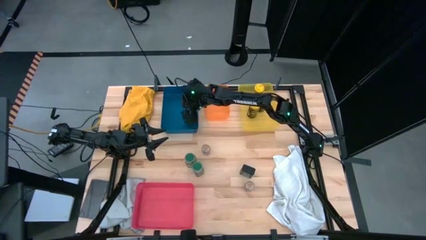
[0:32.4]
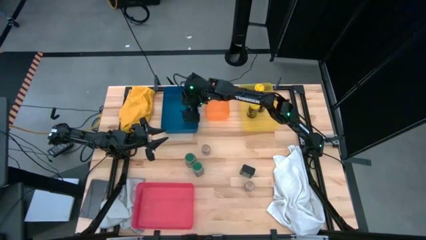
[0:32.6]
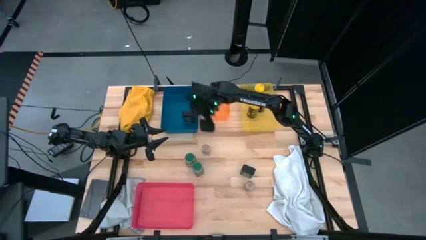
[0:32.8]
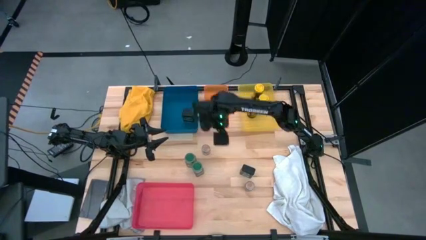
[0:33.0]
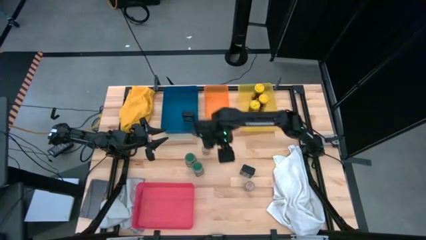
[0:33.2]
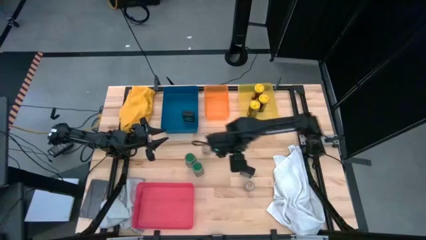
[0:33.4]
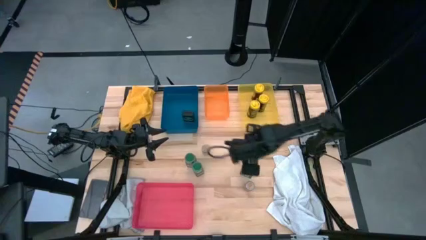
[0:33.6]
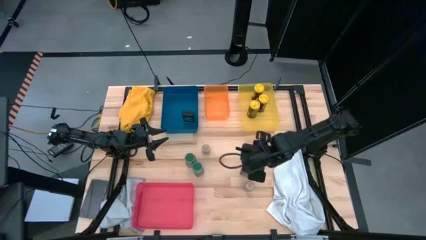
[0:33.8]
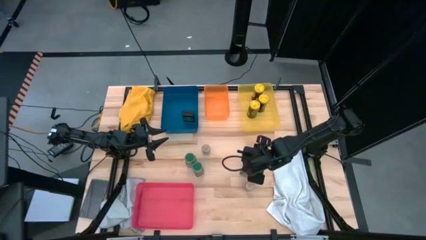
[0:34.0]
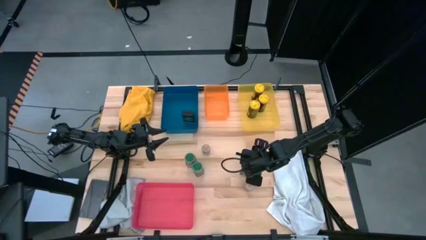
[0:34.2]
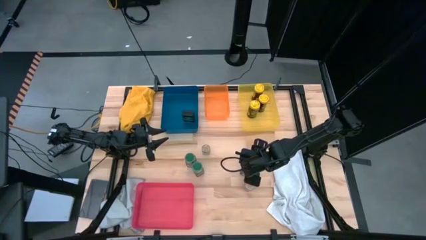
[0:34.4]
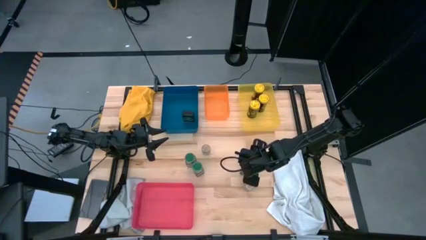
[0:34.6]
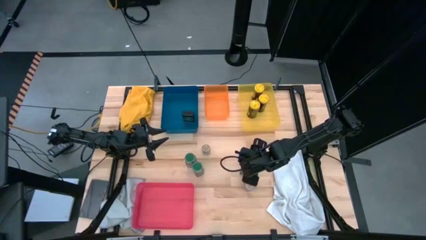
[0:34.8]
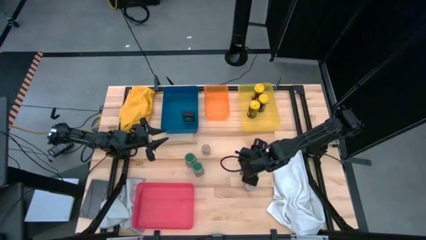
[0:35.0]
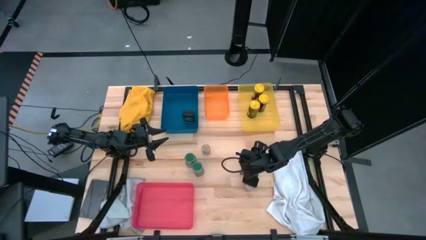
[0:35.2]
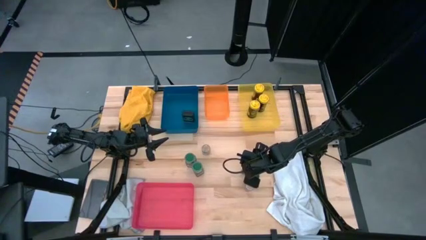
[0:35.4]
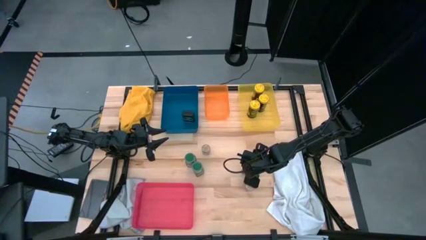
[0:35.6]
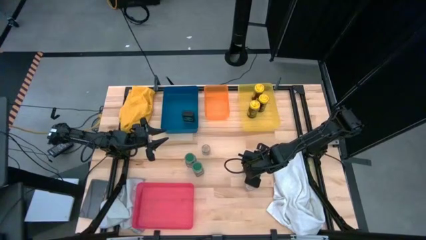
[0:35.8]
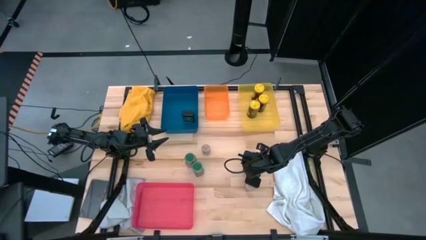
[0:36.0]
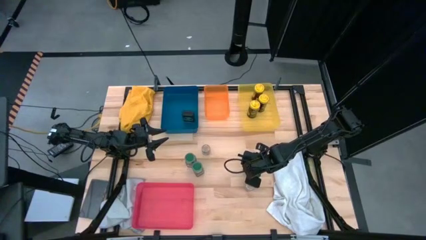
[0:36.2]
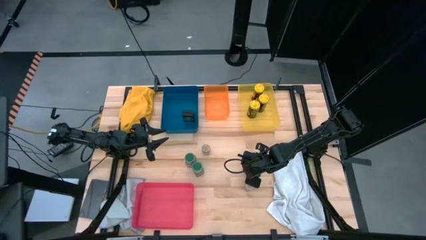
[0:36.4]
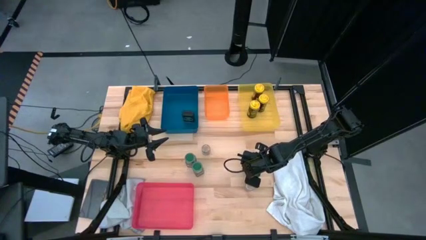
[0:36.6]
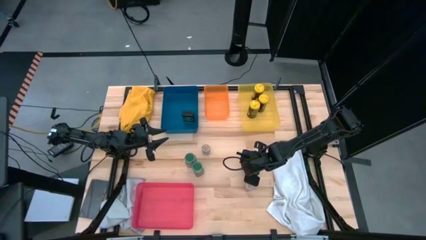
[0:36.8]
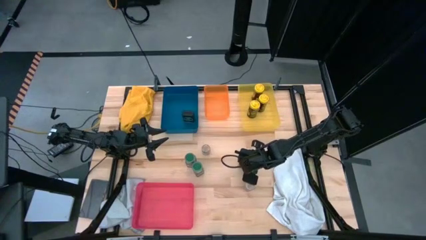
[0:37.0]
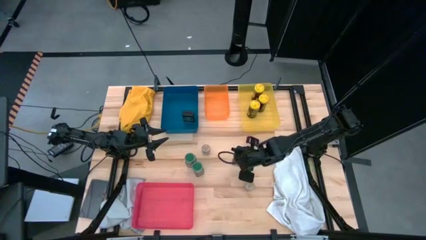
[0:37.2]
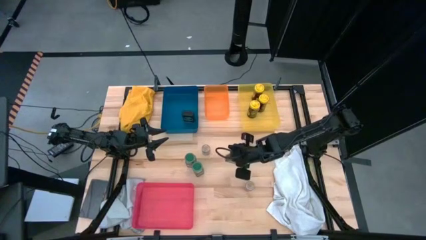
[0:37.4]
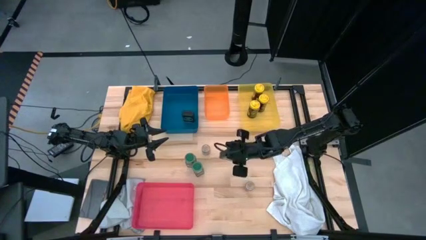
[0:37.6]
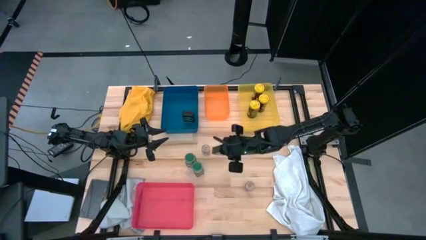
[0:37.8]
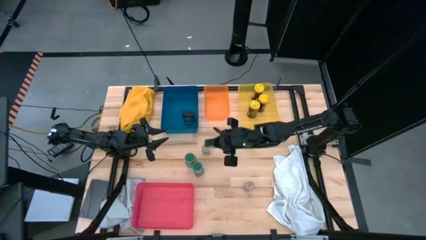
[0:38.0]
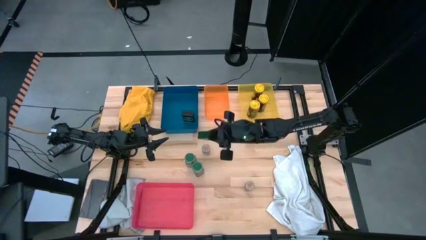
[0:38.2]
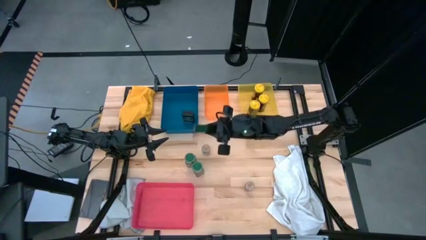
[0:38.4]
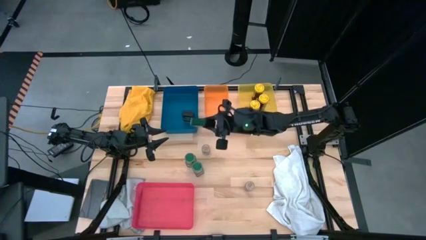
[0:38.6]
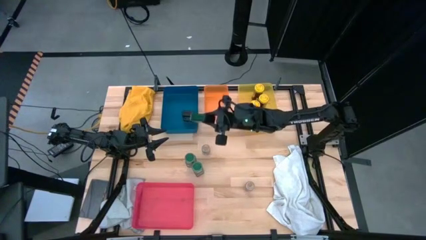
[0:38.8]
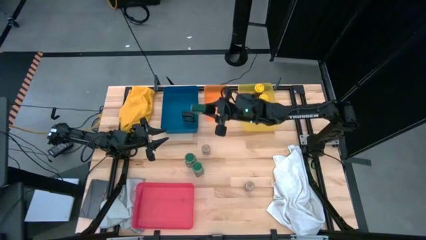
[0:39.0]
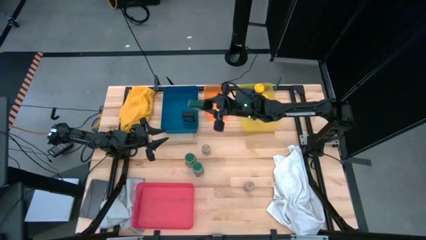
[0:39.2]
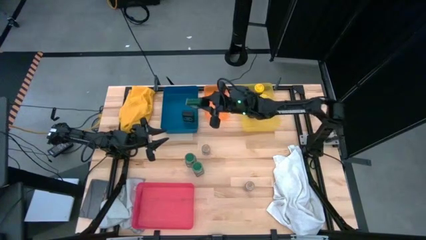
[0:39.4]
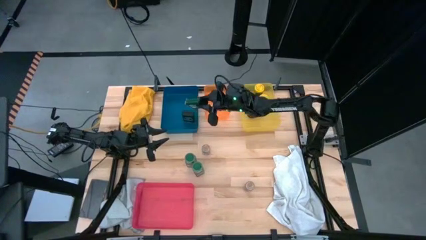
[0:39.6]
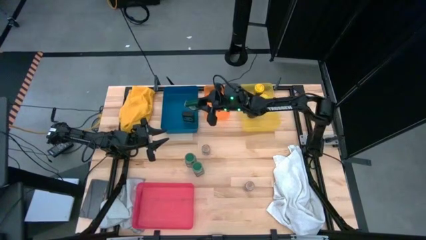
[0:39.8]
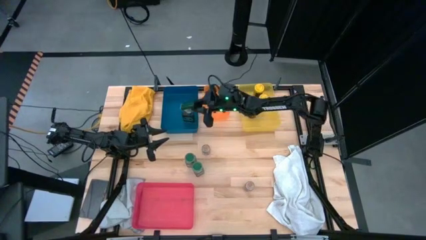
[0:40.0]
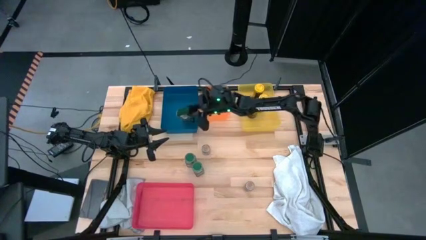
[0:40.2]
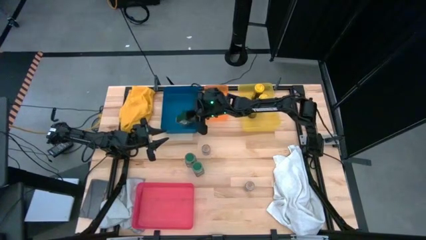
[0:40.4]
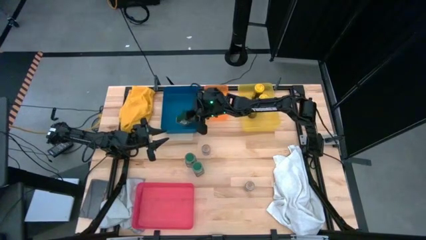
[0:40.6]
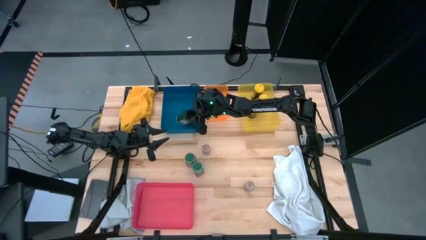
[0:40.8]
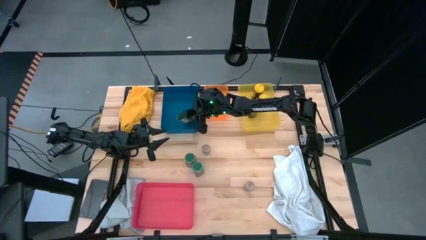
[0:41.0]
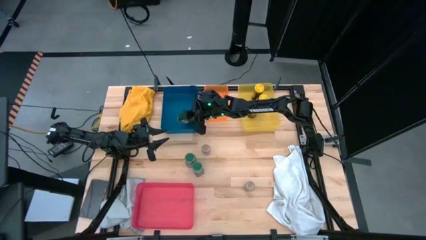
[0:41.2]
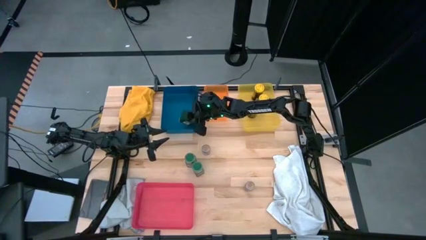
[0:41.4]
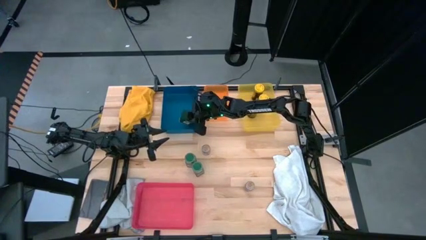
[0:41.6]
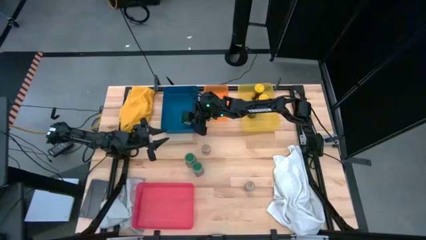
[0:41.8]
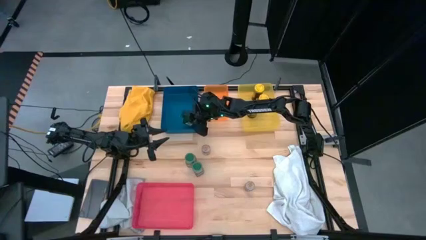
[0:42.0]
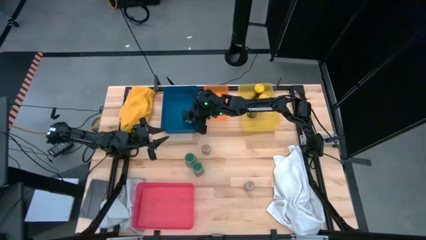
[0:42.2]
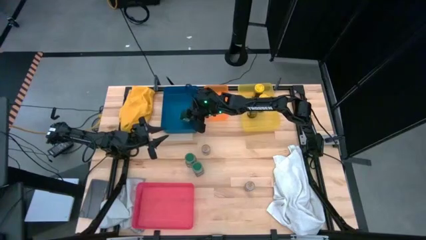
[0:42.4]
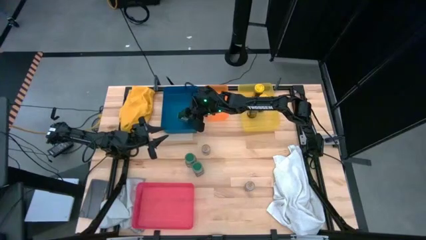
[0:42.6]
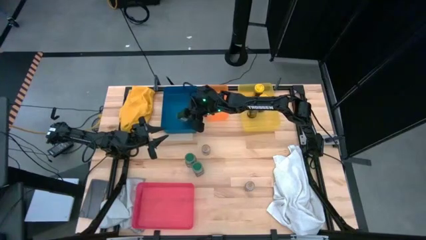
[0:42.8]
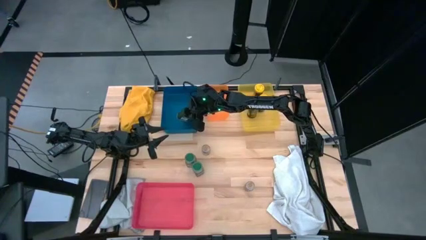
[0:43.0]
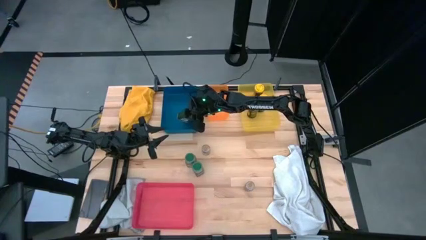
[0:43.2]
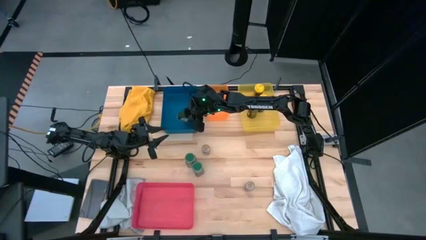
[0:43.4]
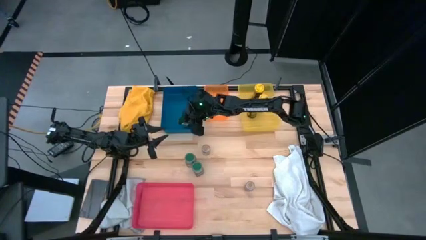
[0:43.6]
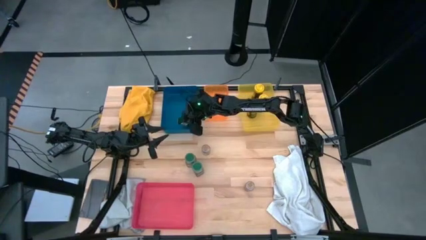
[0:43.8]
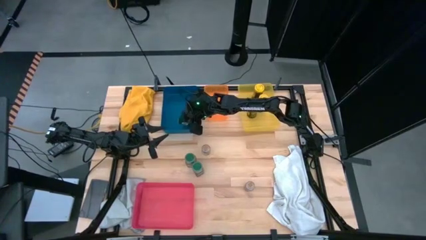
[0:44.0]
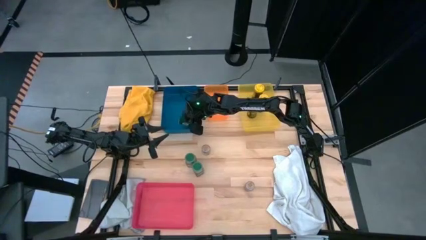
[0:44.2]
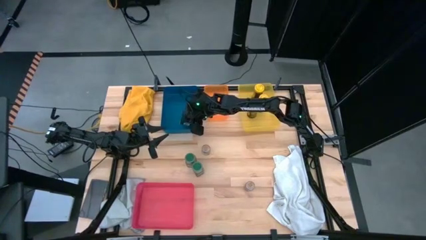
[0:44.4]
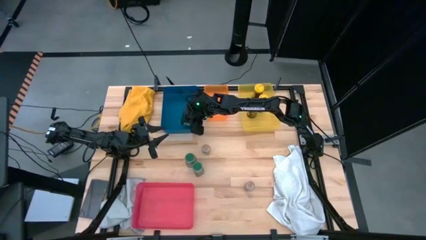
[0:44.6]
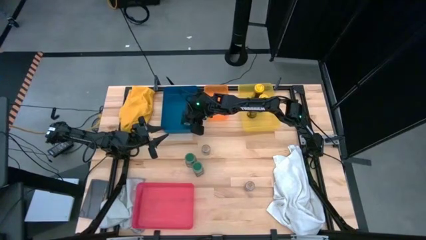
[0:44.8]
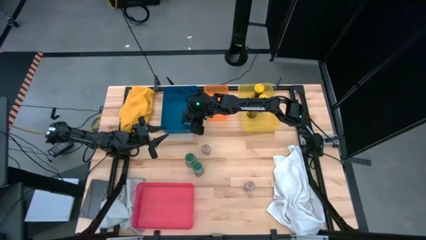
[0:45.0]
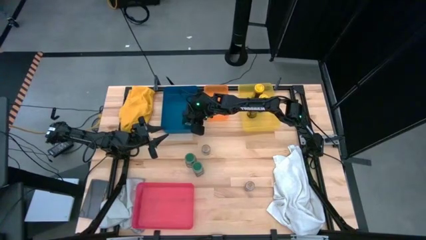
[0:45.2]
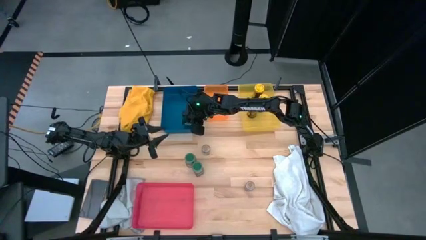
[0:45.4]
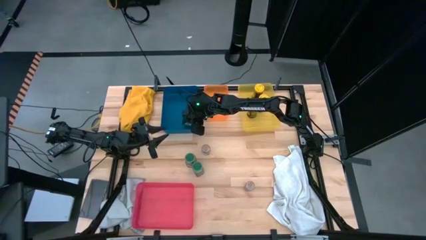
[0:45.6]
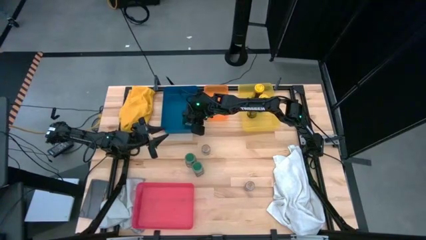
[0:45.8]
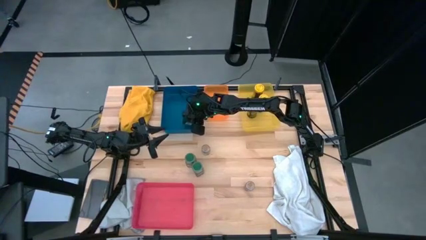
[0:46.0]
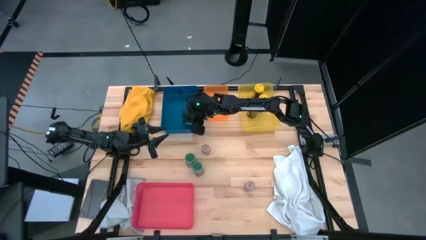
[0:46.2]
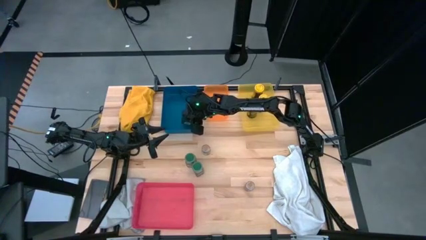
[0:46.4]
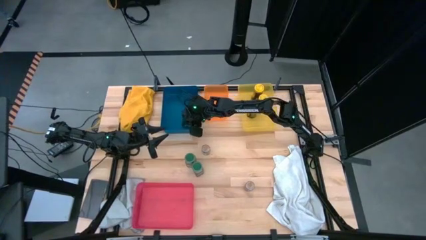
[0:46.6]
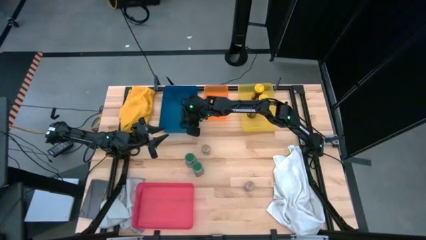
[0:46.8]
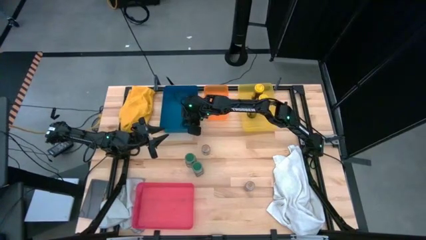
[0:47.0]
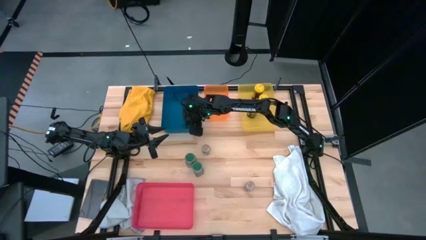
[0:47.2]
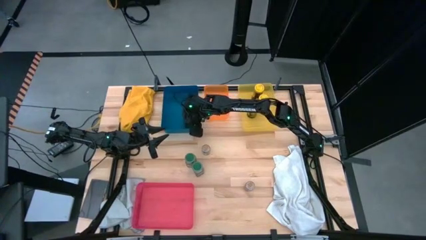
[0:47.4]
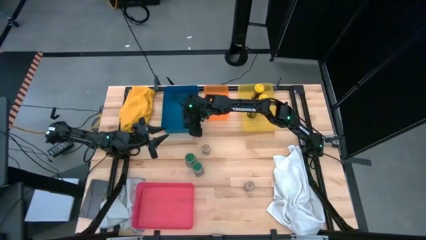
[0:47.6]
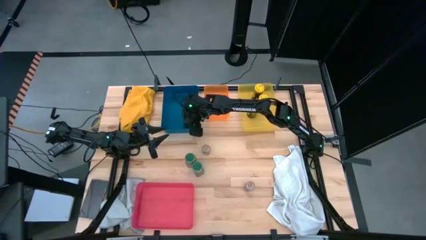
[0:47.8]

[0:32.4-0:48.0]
Task: Sort spices by type
Put the black seasoning can into the blue bin
